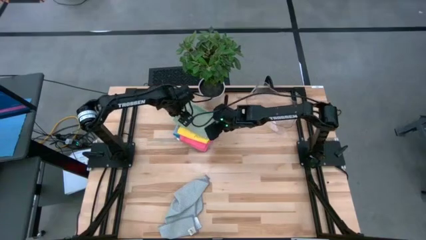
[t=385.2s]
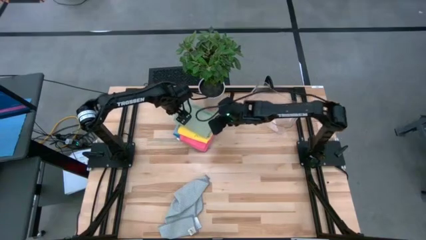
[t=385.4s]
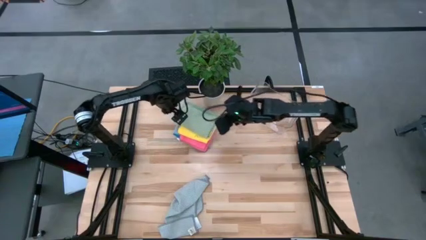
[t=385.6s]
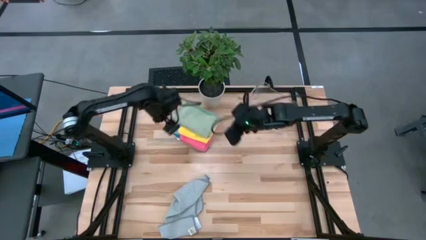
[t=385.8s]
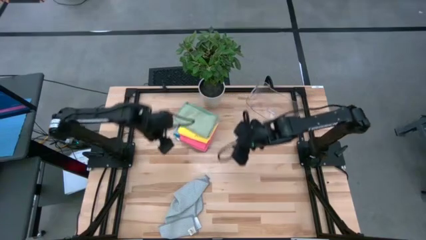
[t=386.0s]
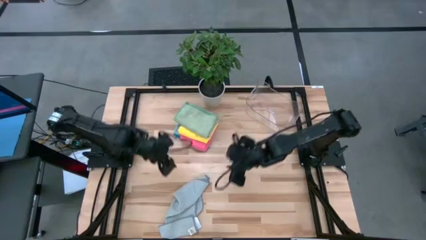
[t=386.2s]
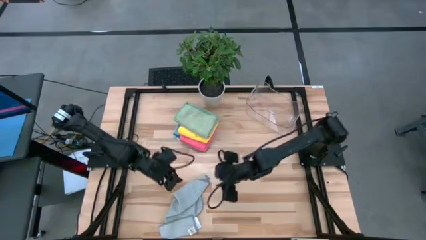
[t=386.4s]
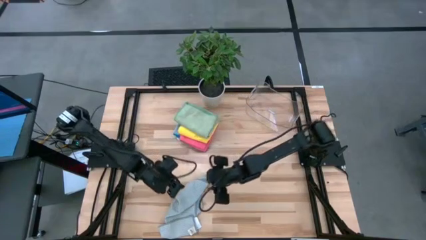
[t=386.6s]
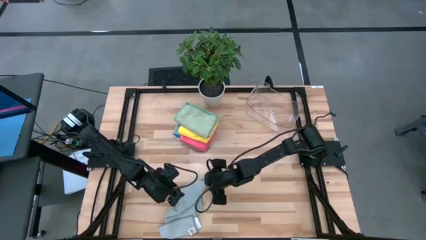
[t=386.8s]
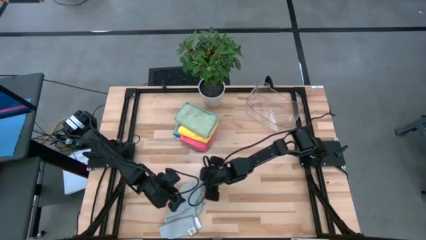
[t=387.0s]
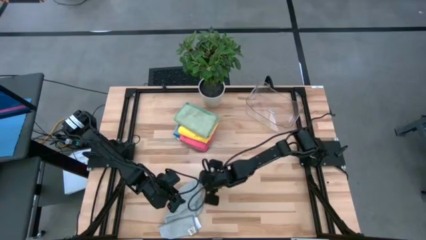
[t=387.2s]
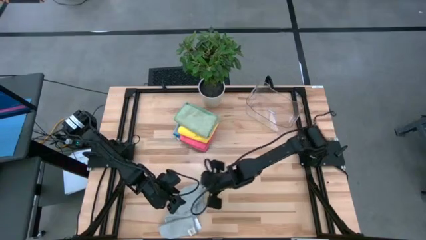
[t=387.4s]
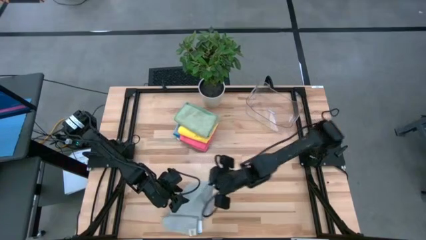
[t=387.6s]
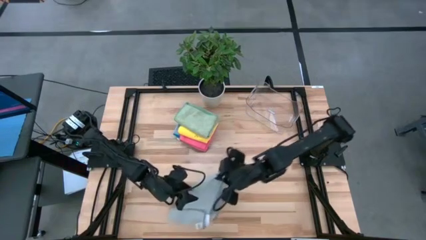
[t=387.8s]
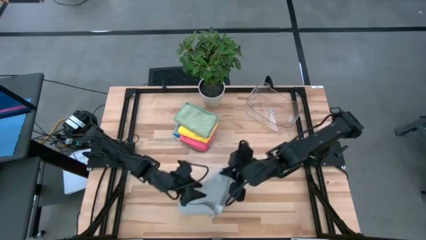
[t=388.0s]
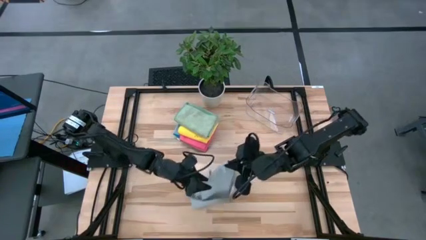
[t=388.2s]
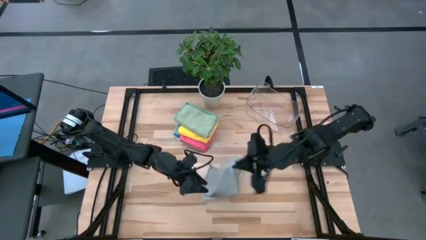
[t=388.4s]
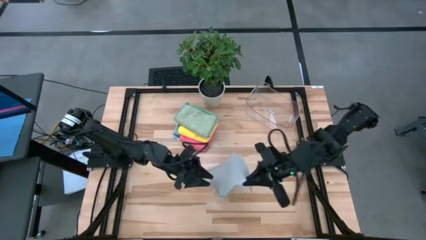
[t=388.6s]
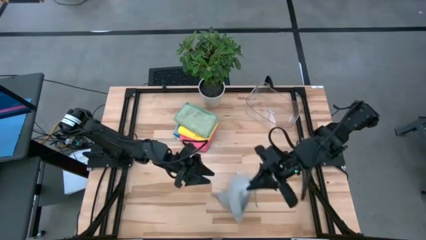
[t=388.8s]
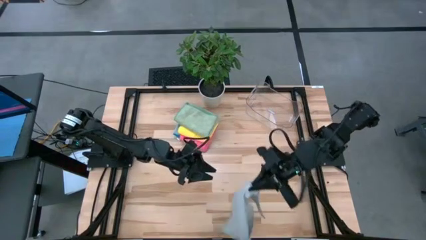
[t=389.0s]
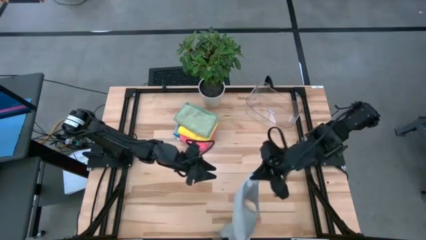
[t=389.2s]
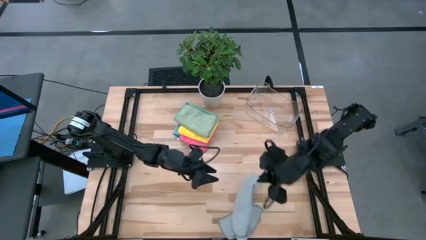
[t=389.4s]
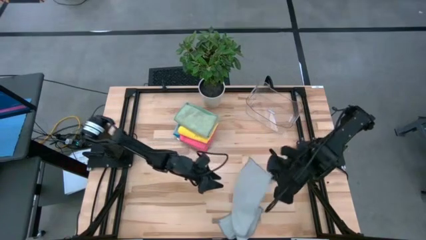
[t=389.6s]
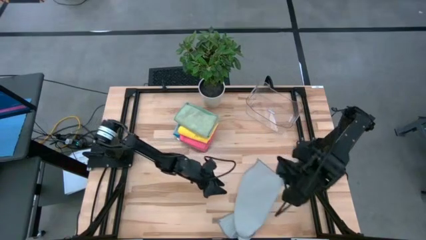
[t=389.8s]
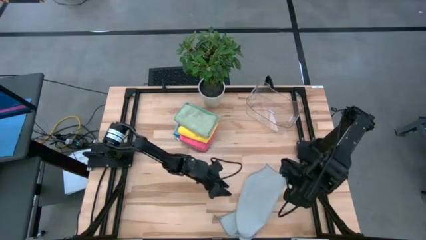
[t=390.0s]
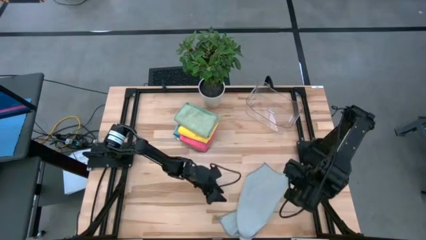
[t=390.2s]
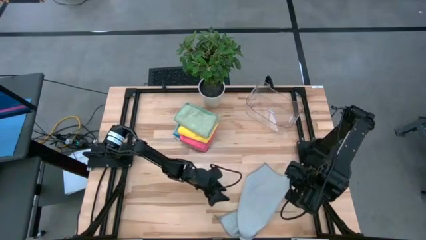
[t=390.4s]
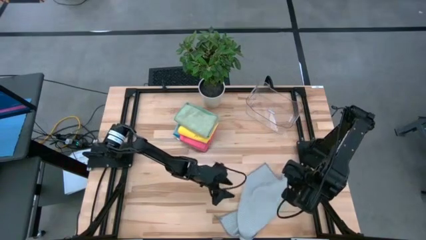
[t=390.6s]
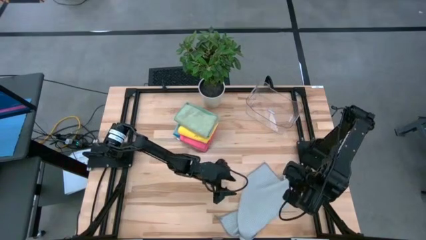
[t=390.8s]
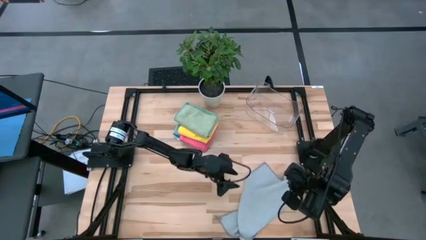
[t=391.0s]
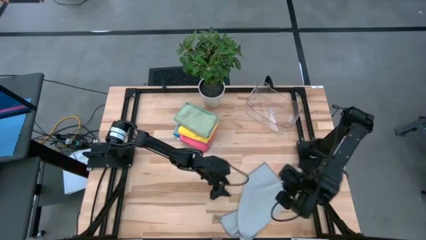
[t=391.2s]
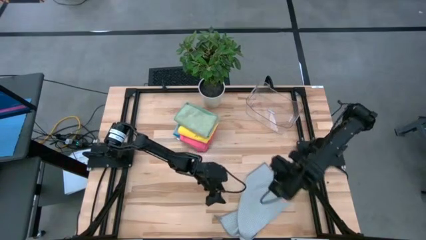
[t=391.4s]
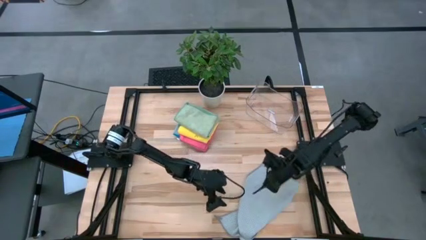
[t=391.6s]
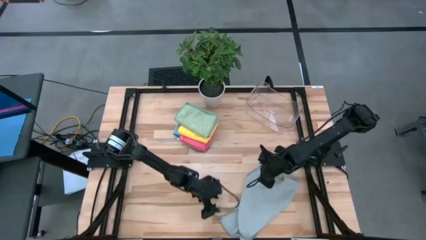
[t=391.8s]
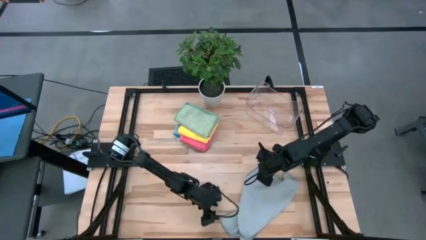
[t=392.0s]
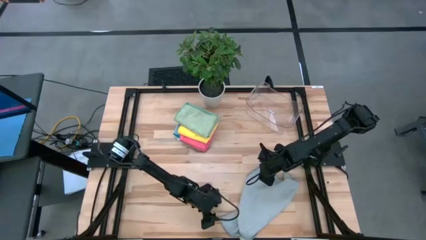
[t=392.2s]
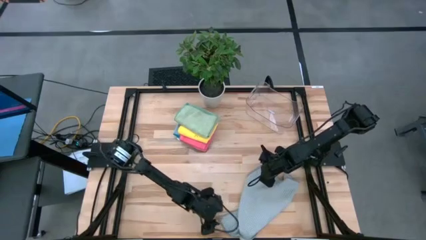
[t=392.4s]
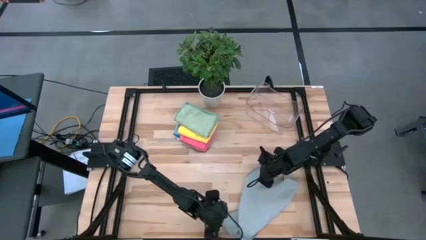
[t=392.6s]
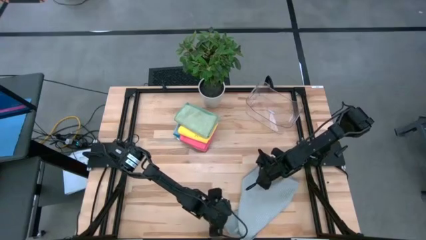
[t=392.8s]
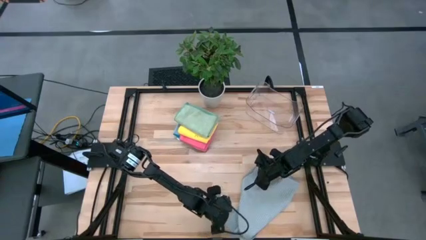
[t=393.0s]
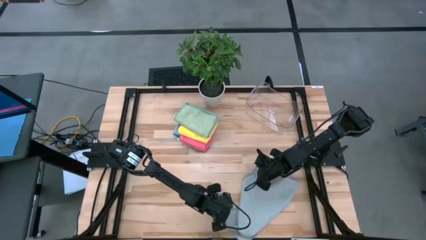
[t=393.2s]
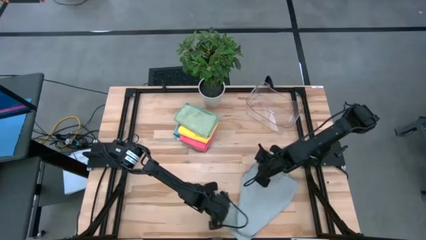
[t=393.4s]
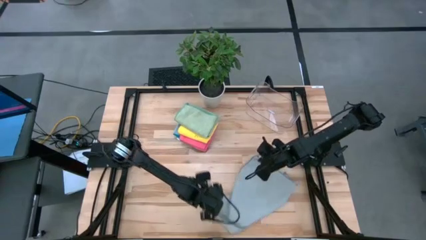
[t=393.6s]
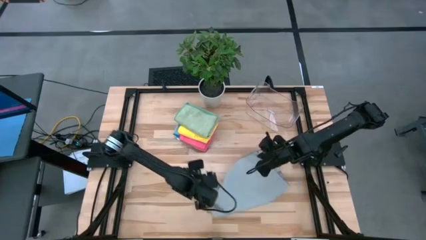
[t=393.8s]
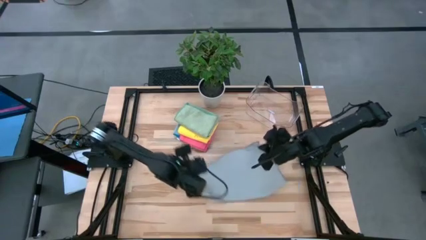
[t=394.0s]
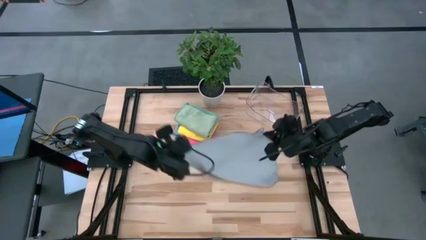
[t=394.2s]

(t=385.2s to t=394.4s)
Task: Fold microfiber towels
Fold the gray microfiber towel

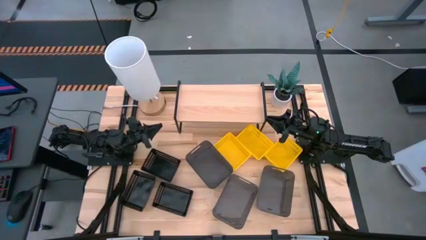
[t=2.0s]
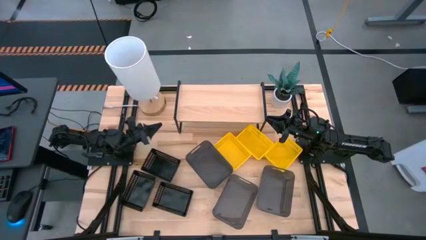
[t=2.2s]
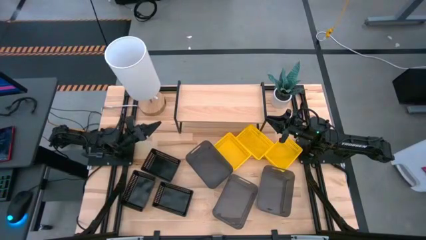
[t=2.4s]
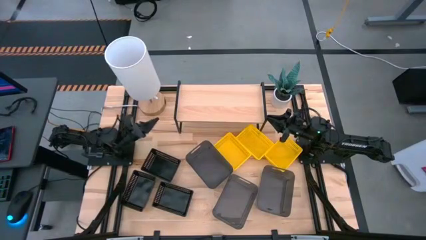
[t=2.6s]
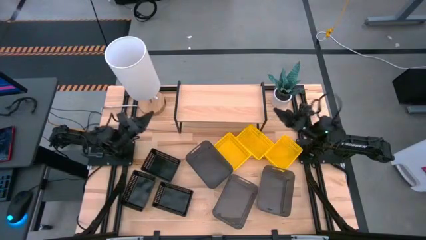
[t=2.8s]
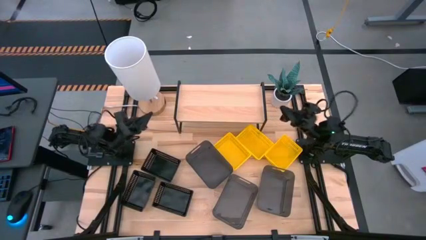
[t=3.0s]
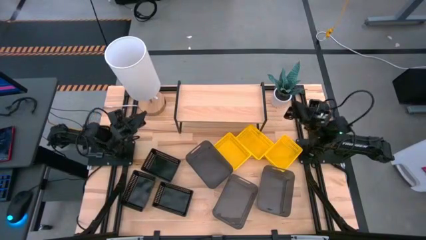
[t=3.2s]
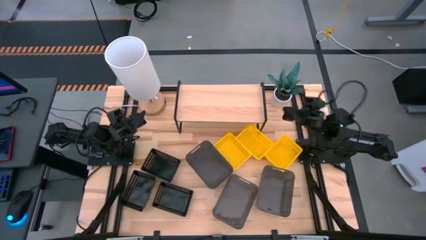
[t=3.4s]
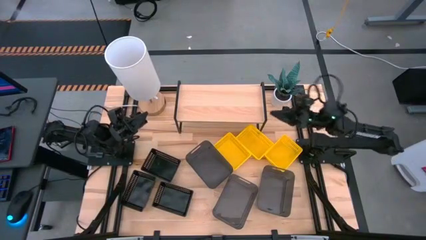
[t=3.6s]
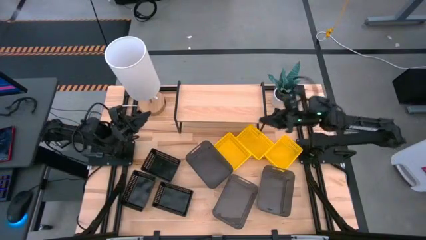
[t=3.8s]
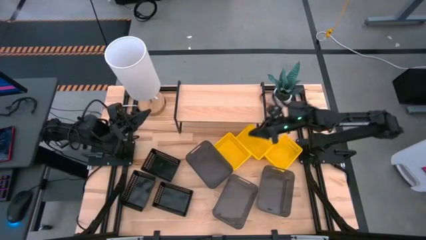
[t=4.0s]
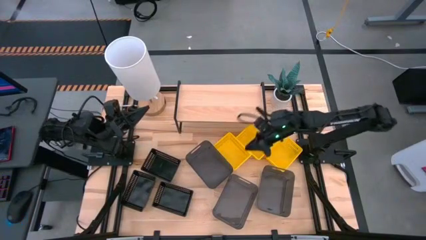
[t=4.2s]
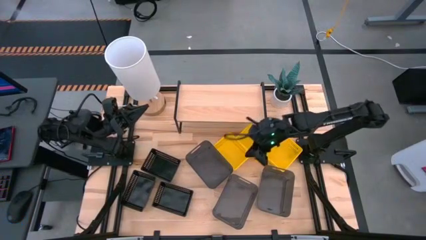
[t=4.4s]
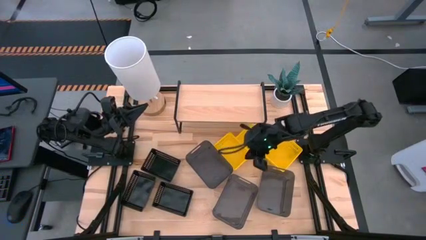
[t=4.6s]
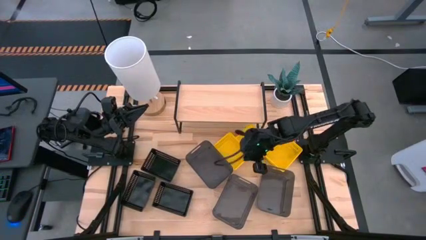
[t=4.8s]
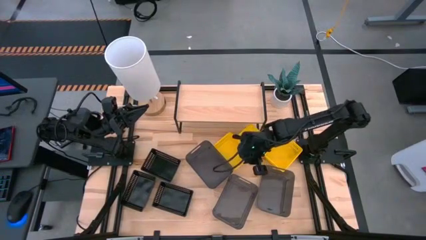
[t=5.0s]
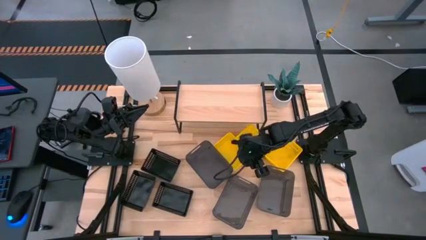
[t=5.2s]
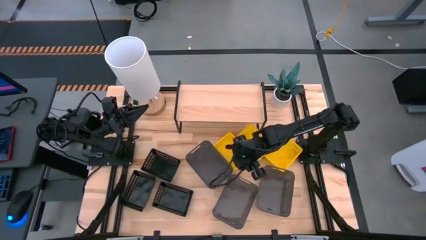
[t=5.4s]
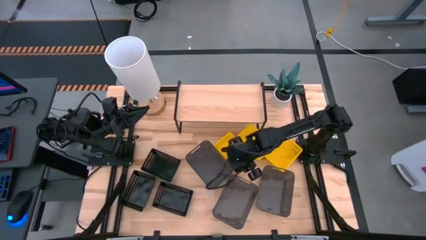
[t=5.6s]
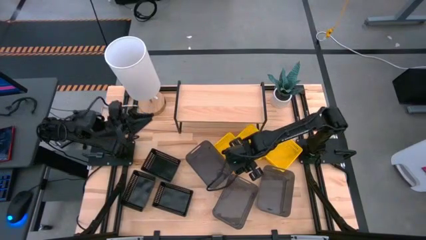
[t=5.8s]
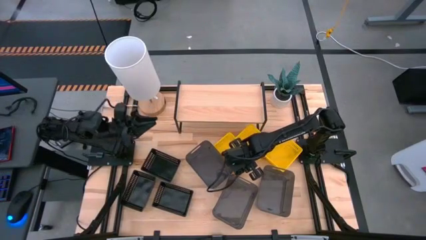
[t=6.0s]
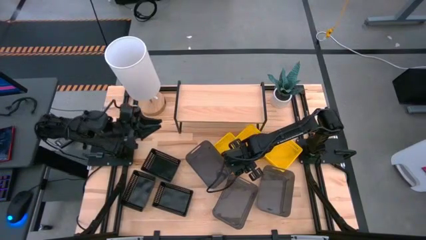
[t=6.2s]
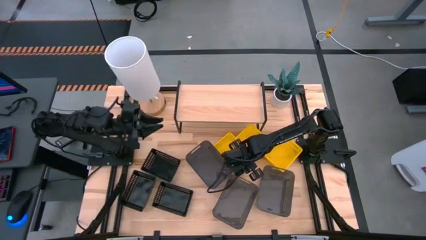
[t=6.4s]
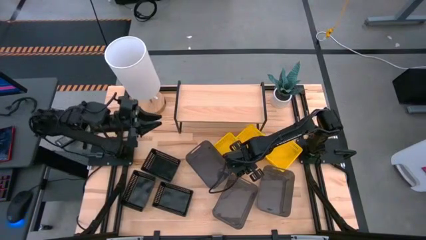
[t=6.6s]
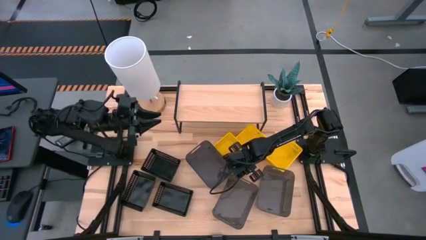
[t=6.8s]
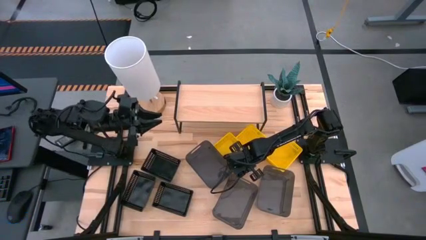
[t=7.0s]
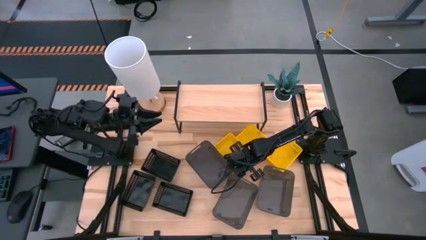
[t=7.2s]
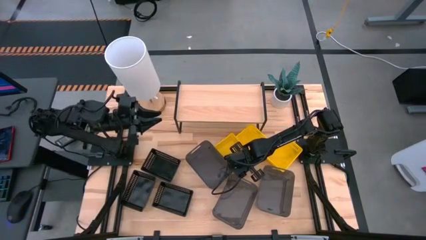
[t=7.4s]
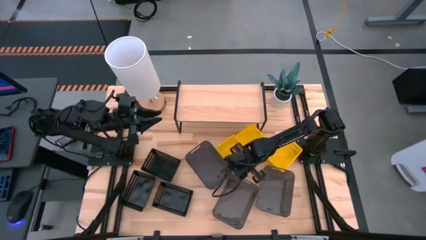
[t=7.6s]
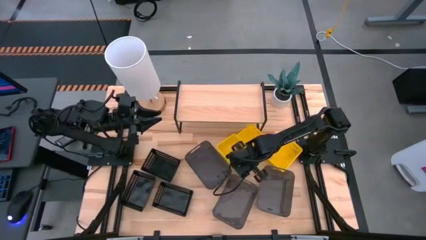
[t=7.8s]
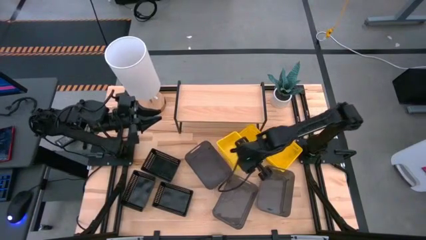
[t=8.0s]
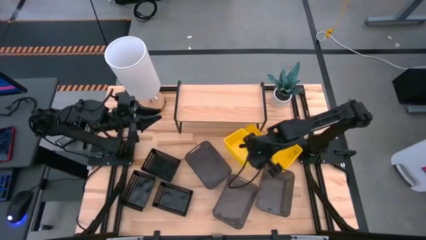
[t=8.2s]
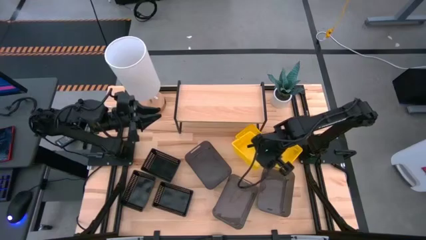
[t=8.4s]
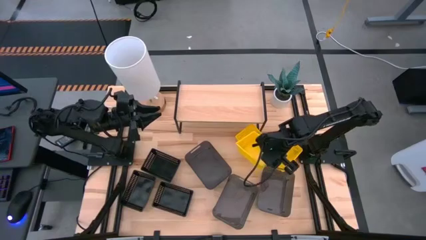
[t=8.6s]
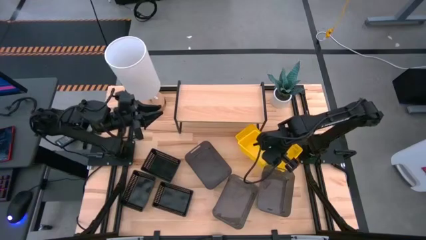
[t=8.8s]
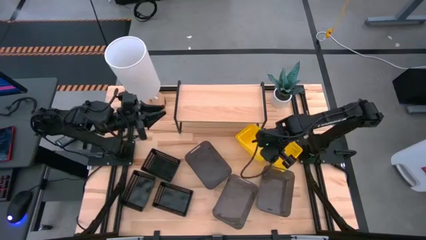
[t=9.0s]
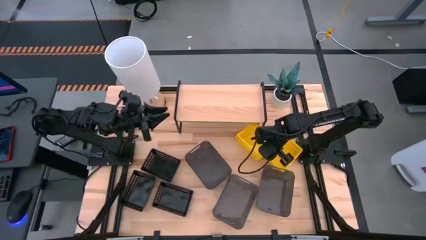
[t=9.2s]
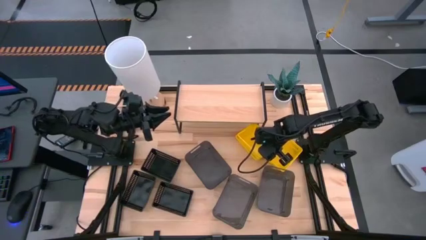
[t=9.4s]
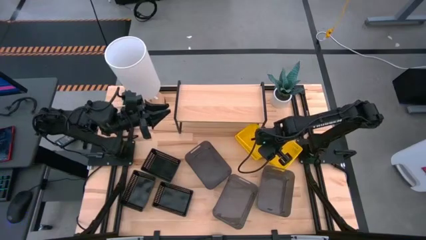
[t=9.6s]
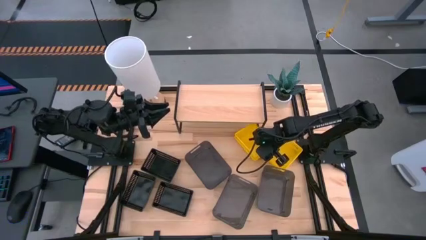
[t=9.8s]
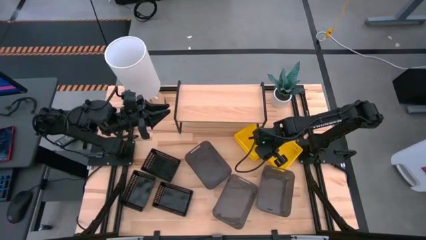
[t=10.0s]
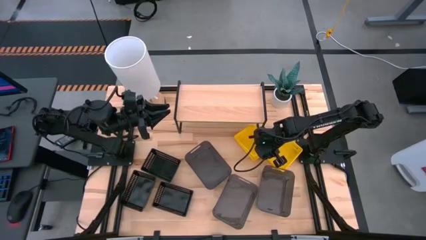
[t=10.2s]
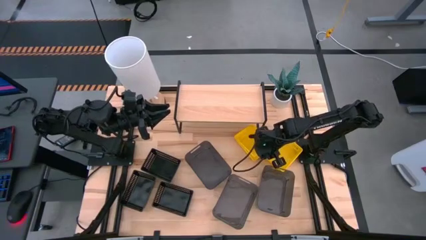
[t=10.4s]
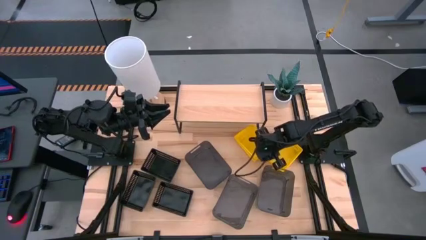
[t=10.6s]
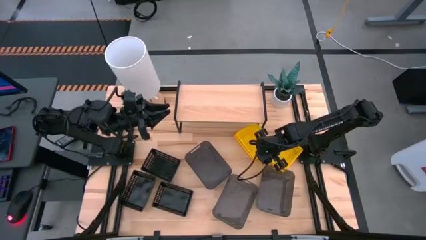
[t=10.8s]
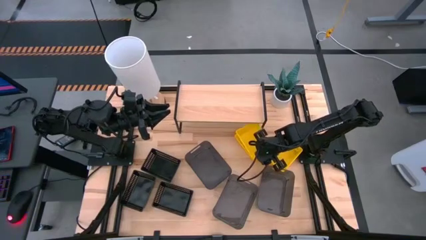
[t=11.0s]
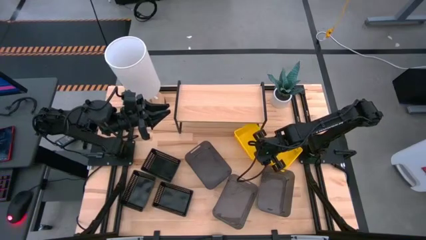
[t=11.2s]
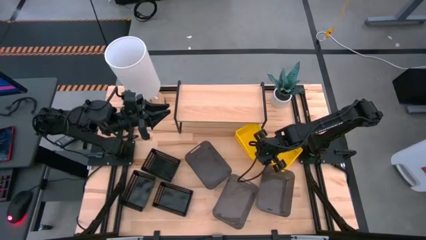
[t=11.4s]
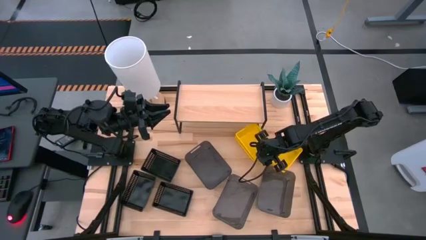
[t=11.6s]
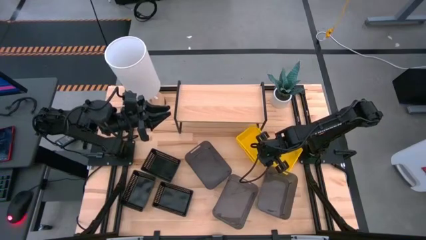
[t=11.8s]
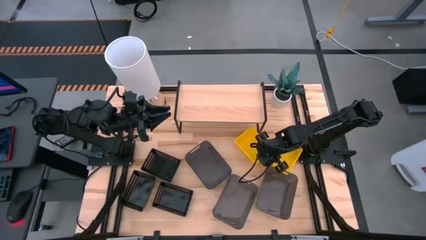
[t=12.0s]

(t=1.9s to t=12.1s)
Task: Stack baskets on shelf by color
Stack the left yellow bin on top of the middle yellow bin
